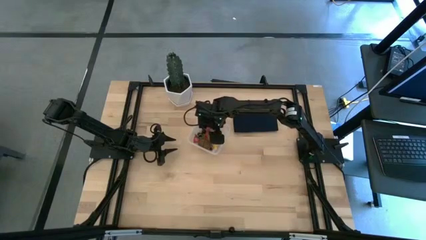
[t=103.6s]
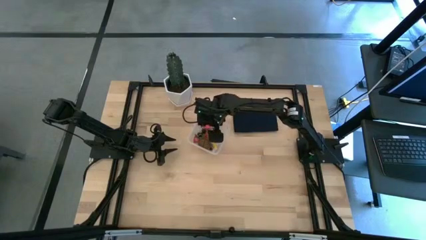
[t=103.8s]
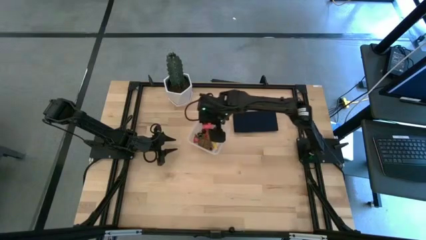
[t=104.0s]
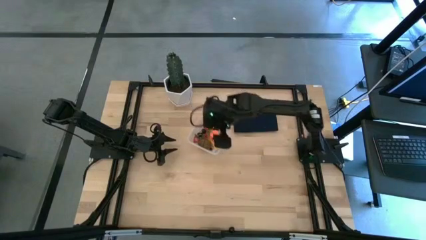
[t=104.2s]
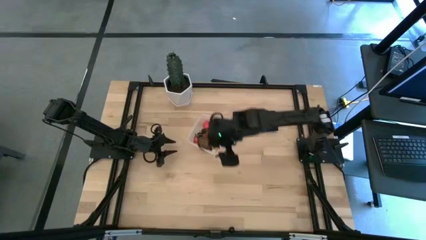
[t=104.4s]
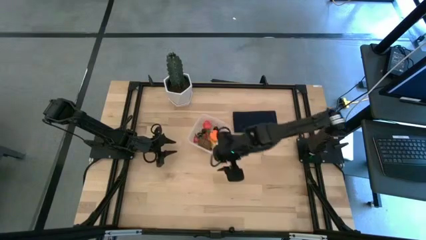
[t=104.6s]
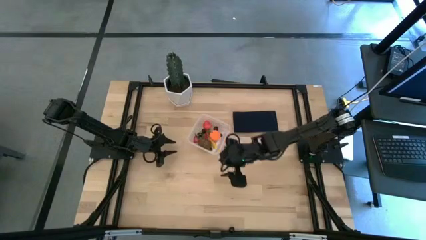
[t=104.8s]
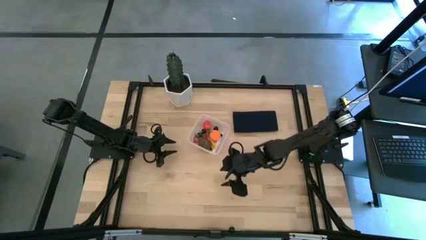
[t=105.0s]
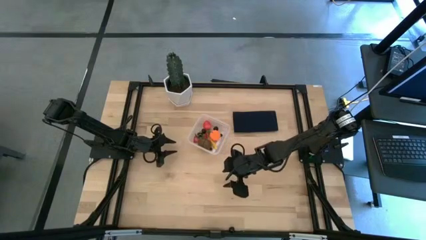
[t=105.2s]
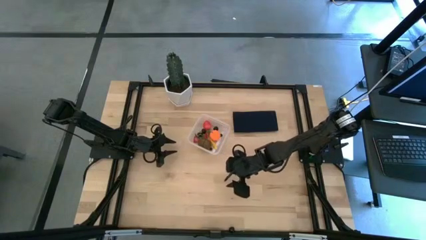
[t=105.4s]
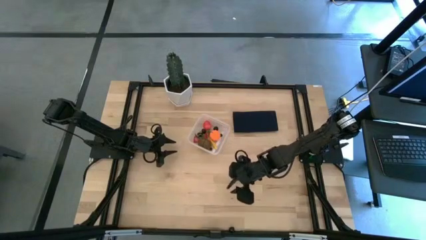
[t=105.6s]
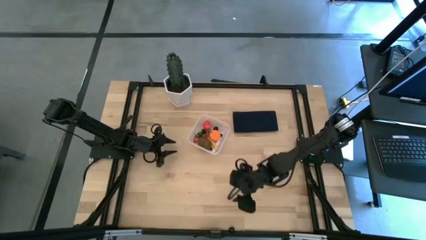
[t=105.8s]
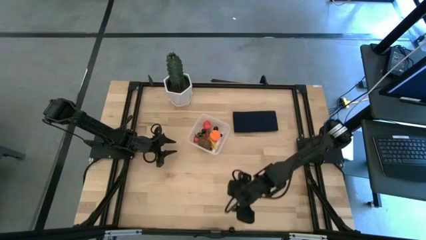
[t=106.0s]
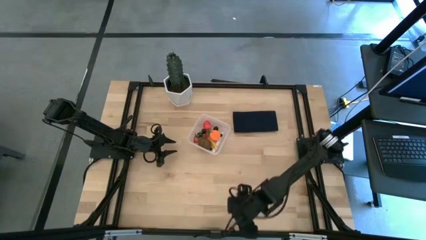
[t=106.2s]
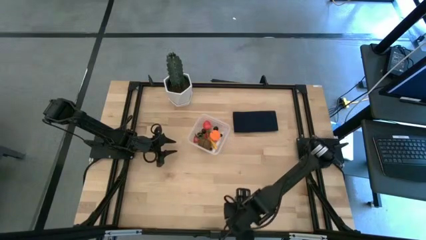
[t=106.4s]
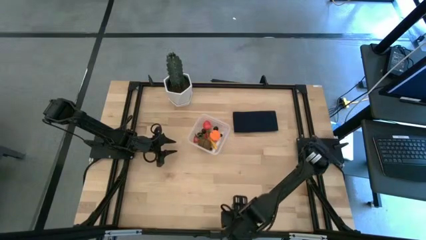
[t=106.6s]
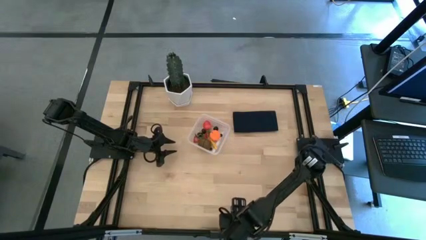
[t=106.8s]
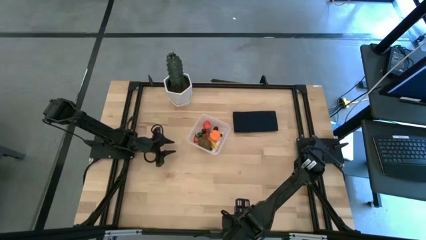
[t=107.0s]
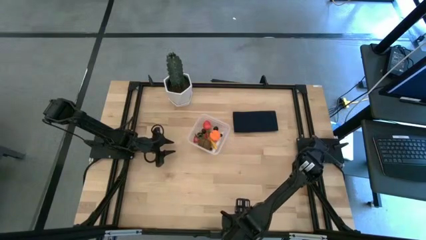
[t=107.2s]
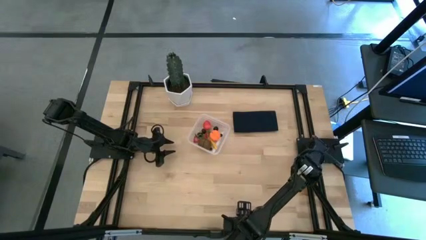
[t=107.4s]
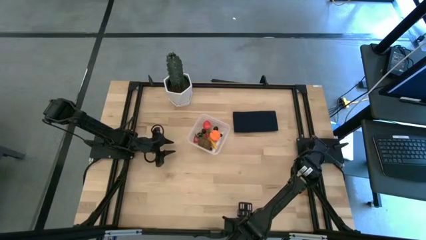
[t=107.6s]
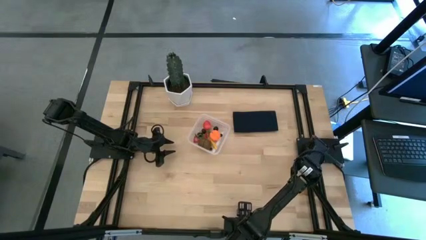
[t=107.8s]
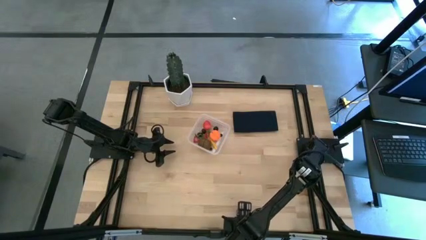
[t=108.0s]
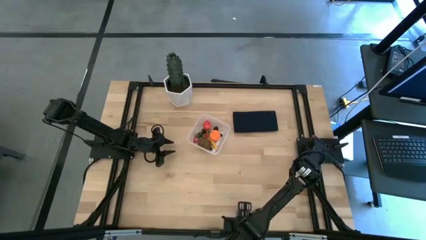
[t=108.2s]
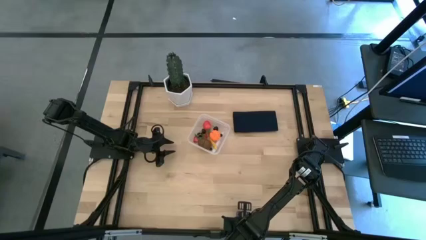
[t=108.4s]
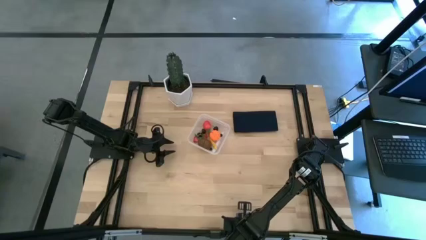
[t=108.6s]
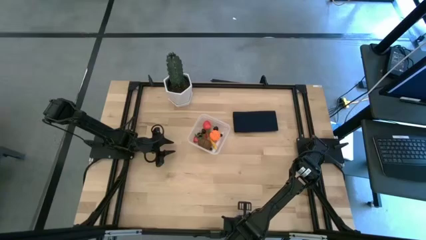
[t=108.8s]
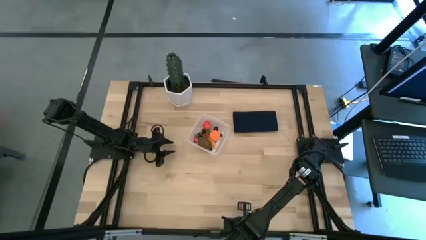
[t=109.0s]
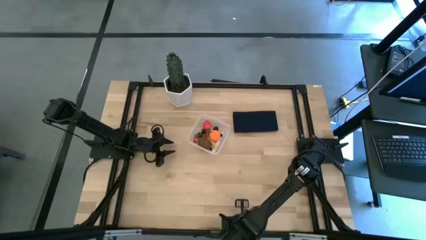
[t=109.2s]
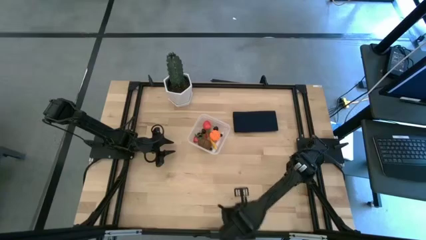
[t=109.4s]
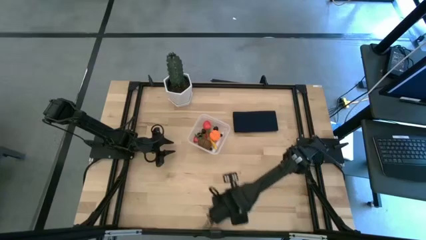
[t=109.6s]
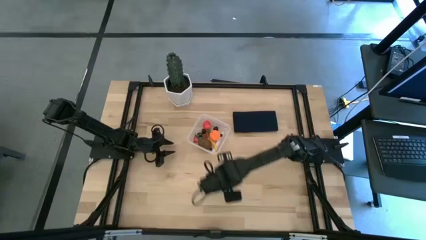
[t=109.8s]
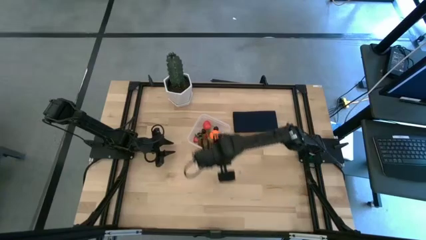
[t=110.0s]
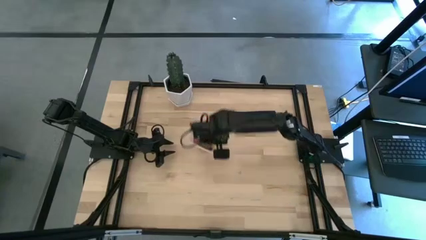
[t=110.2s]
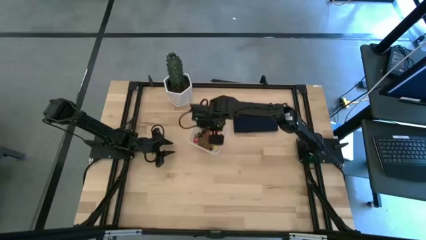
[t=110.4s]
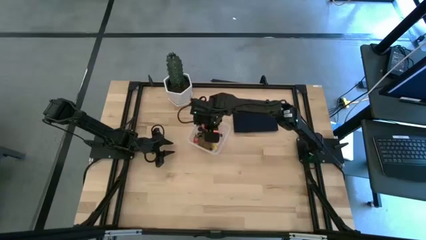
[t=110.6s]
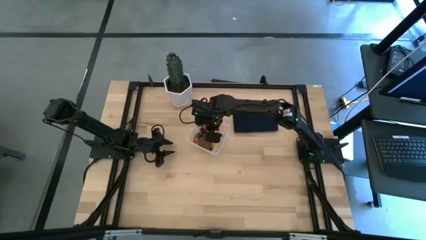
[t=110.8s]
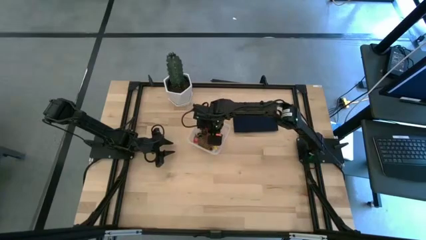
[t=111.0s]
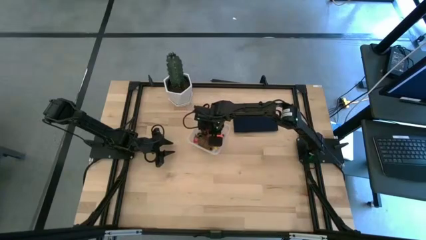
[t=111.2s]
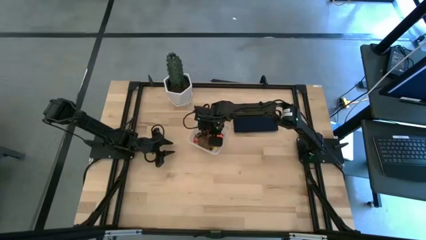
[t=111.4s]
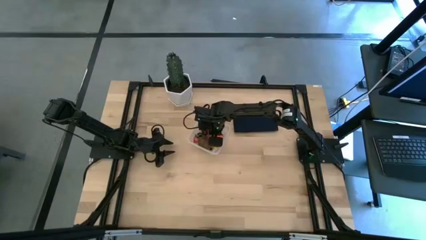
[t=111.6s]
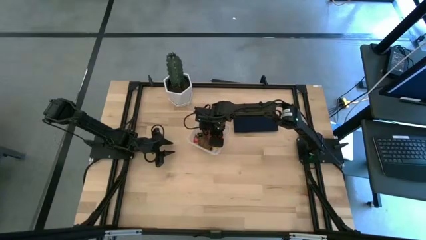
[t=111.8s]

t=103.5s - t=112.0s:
Task: Pick and placing Produce into tupperware
Put the black cherry into the transparent container

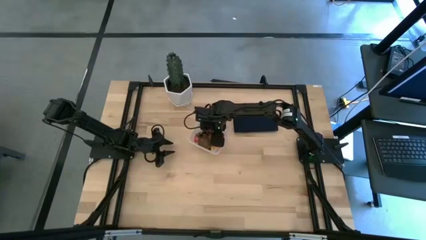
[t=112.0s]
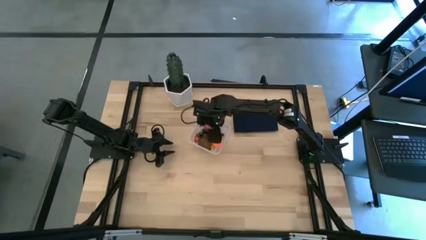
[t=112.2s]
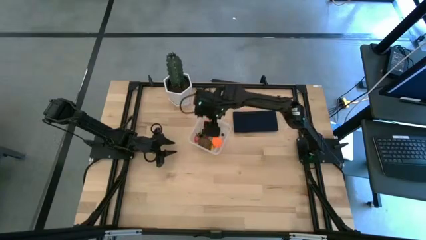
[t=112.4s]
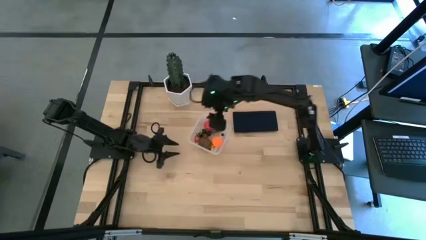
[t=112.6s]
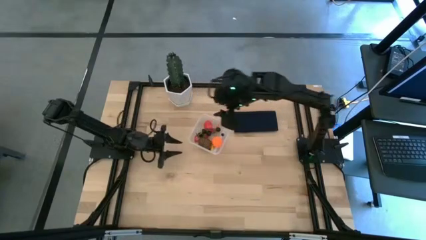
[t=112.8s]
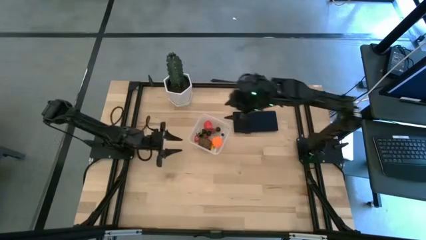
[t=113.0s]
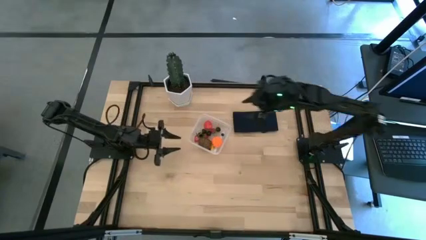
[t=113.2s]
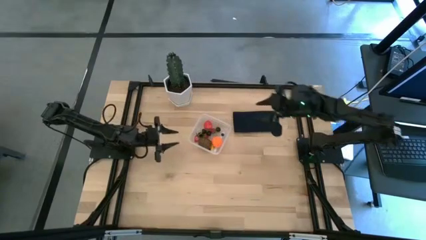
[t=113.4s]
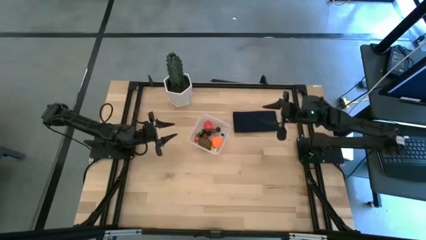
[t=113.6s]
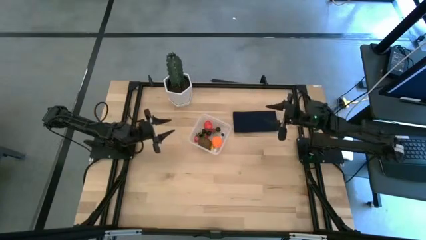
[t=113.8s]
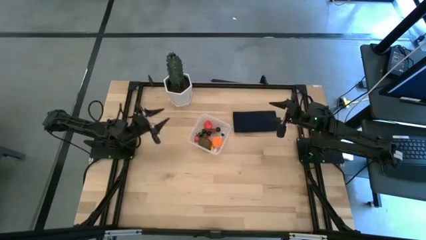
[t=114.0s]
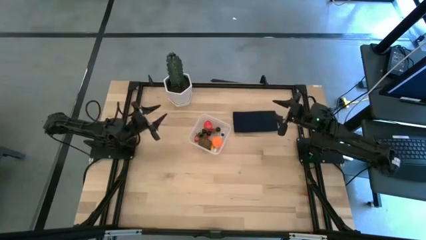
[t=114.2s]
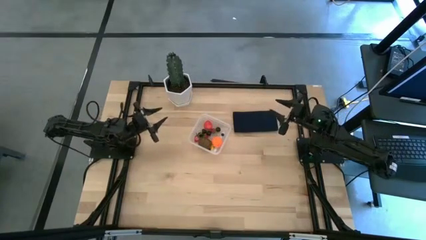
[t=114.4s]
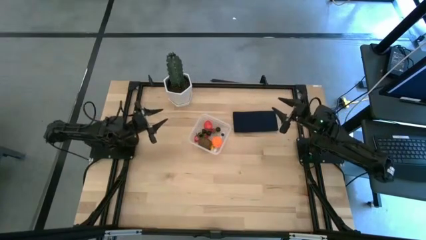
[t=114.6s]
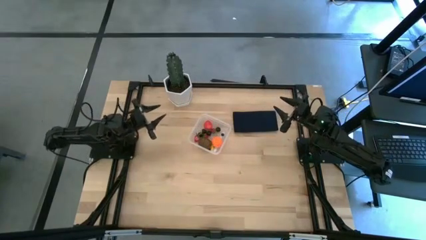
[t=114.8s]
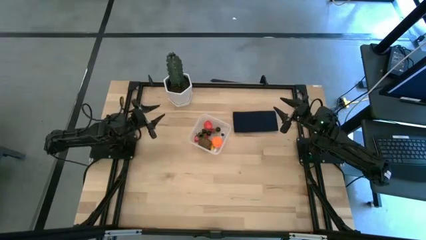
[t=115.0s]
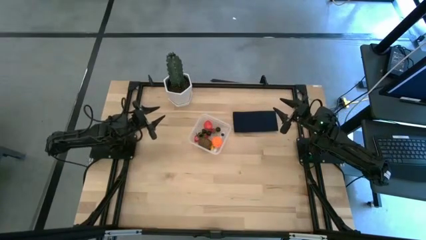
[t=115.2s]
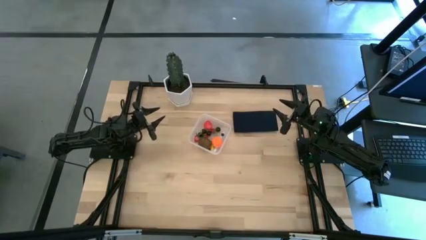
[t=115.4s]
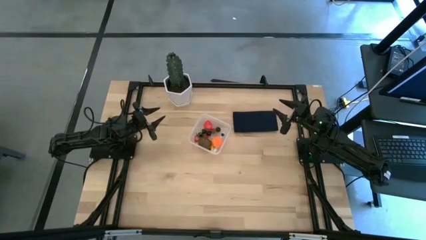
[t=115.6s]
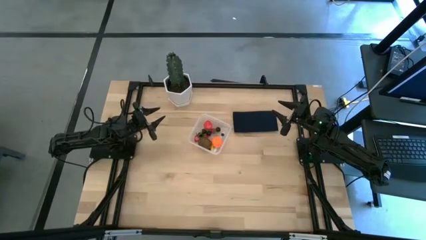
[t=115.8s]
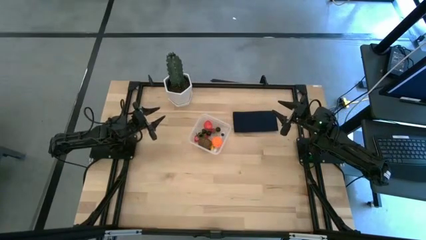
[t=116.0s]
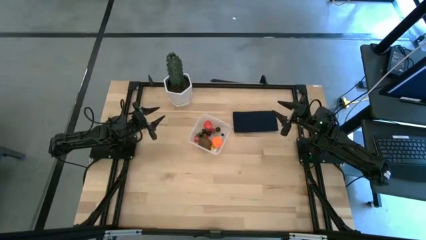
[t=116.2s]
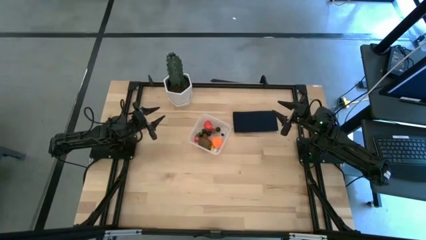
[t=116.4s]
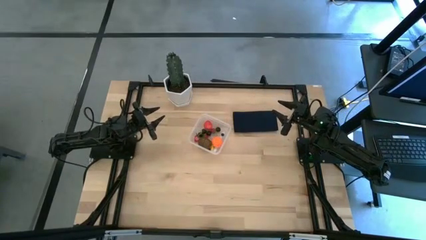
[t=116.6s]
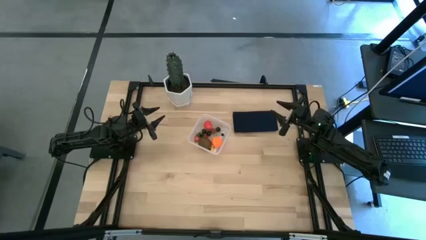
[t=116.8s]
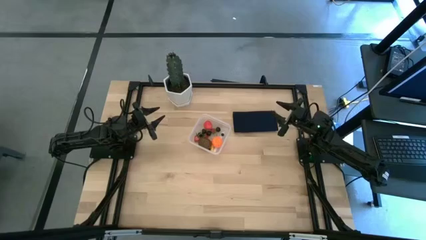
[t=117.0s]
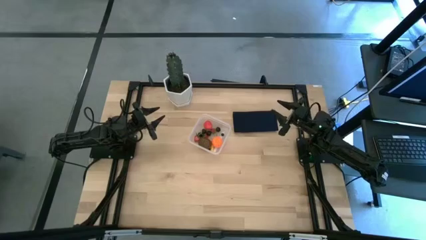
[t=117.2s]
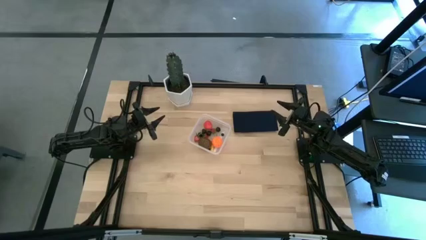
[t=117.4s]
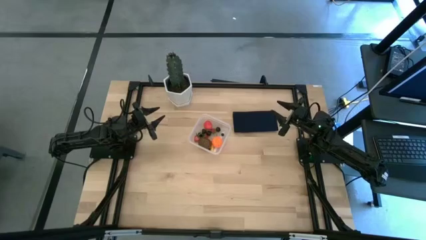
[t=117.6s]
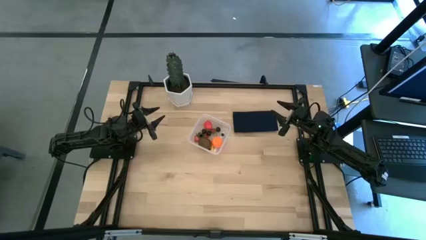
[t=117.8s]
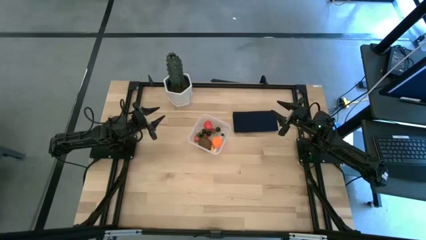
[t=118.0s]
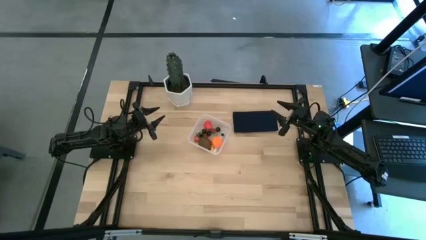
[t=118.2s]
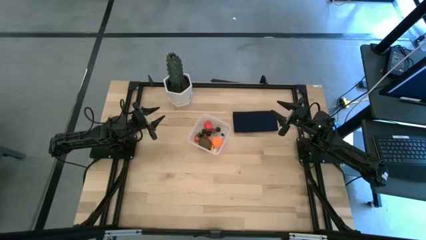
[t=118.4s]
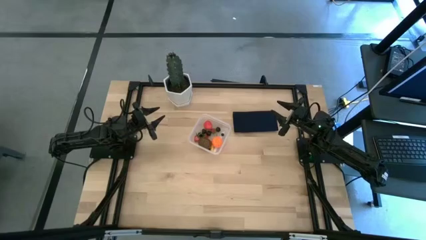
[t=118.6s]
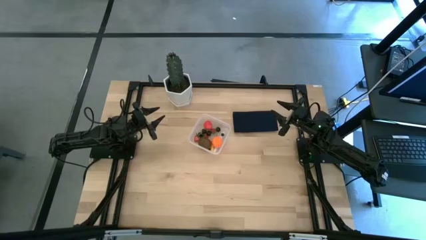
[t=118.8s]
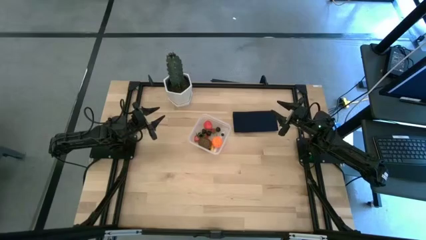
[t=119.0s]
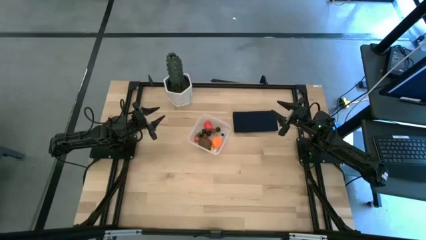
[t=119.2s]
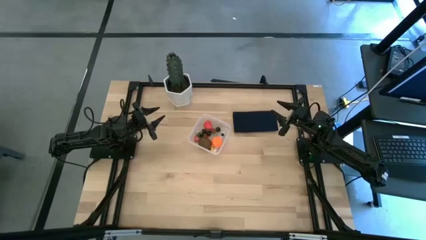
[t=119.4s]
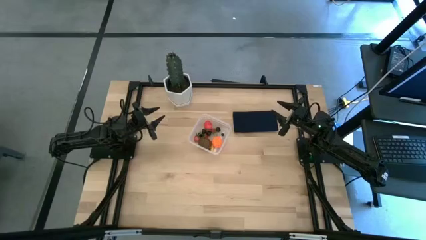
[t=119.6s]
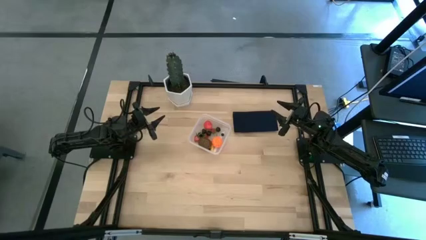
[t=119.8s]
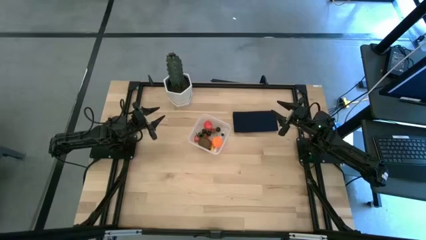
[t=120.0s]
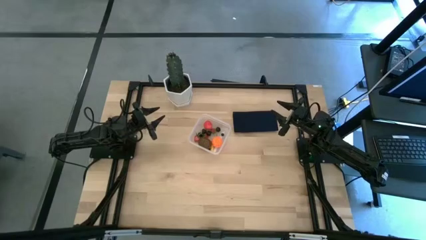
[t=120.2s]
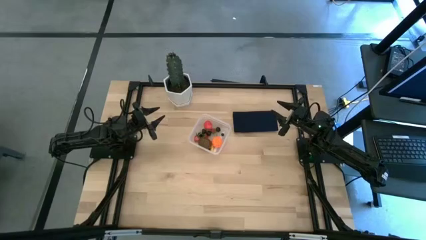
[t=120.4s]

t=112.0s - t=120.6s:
Return to Home Position
